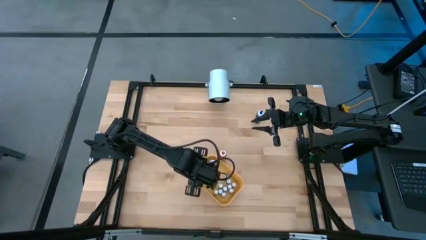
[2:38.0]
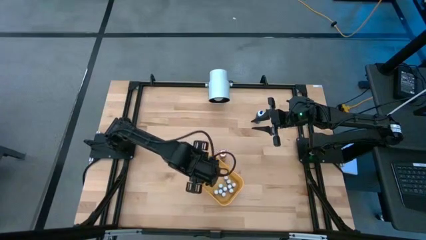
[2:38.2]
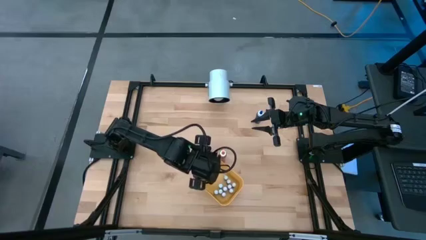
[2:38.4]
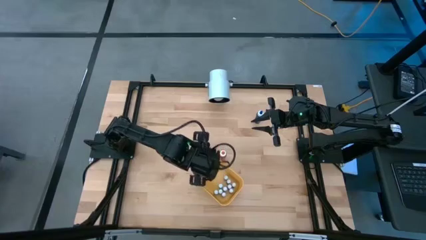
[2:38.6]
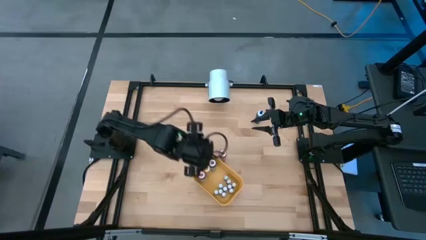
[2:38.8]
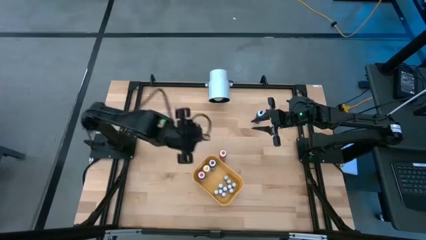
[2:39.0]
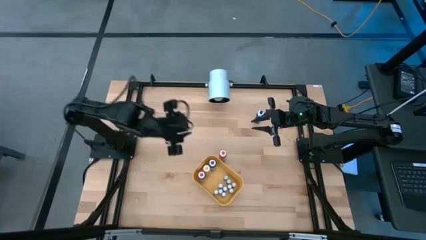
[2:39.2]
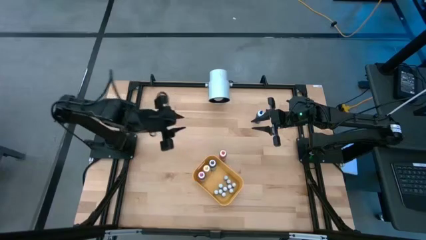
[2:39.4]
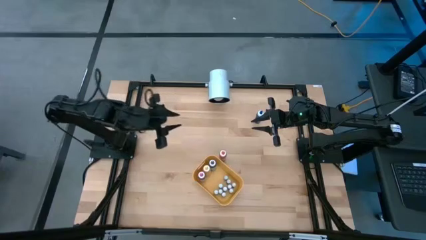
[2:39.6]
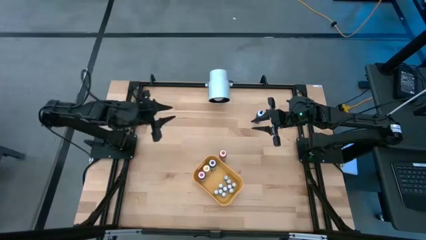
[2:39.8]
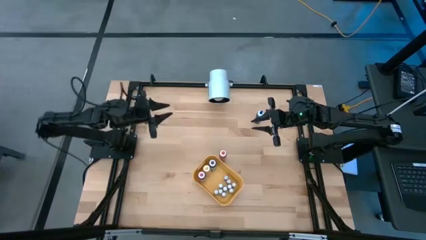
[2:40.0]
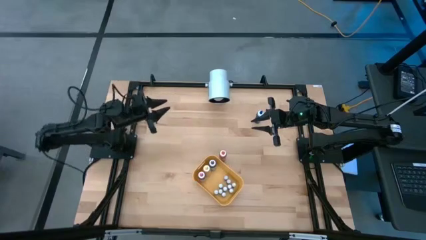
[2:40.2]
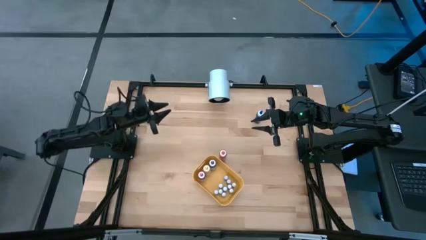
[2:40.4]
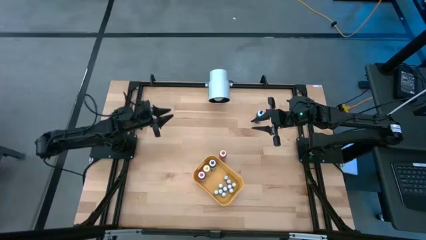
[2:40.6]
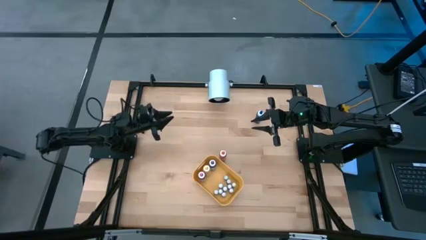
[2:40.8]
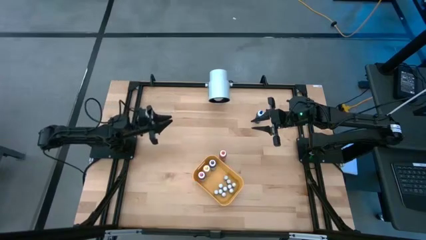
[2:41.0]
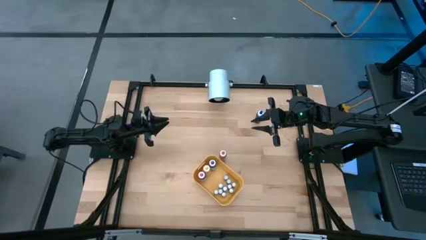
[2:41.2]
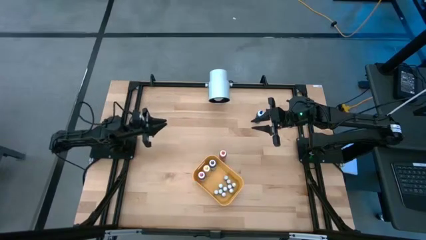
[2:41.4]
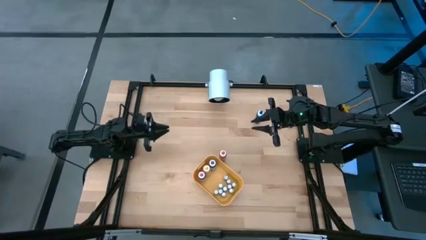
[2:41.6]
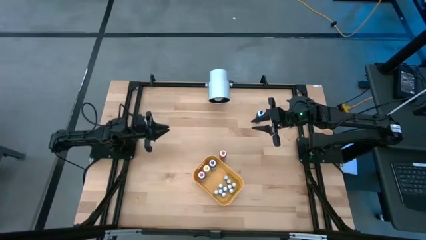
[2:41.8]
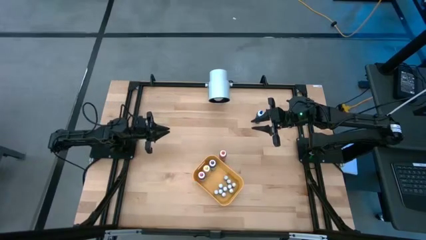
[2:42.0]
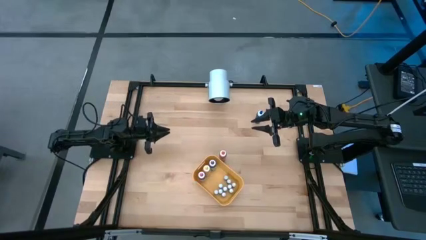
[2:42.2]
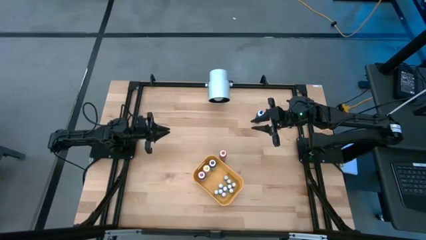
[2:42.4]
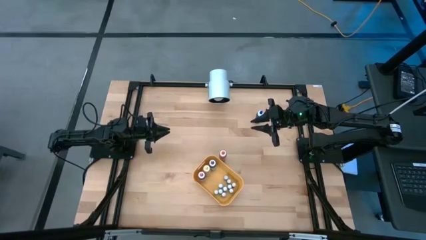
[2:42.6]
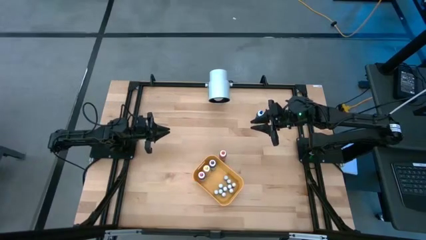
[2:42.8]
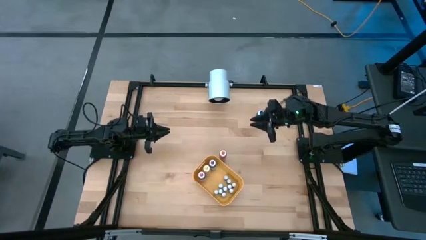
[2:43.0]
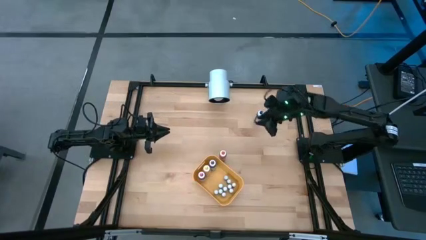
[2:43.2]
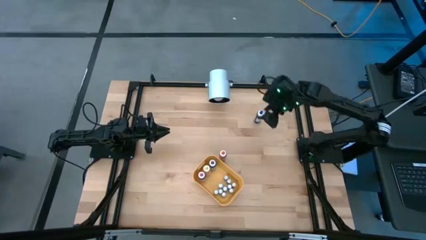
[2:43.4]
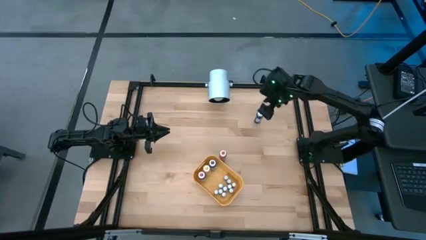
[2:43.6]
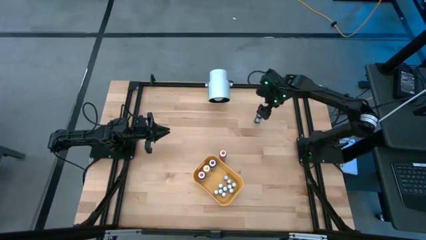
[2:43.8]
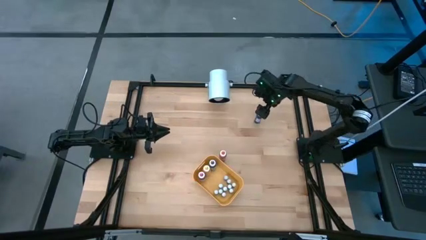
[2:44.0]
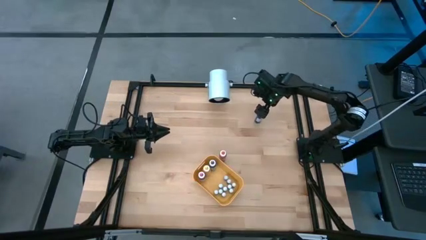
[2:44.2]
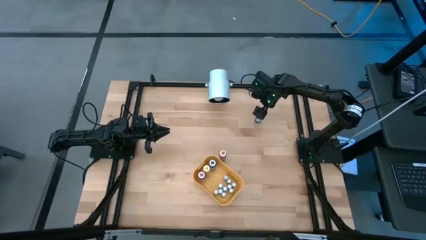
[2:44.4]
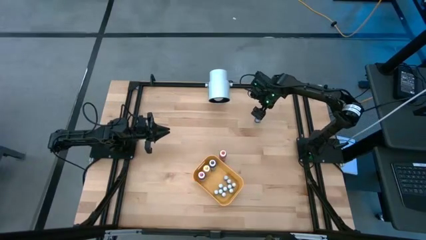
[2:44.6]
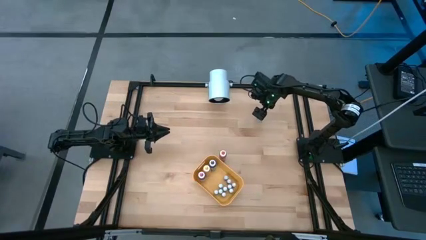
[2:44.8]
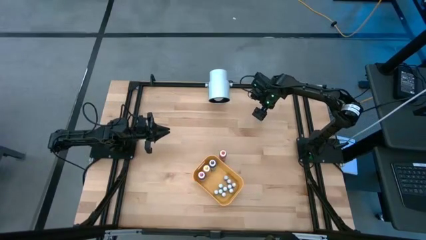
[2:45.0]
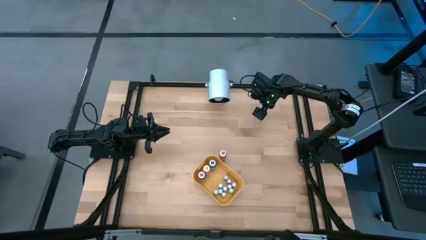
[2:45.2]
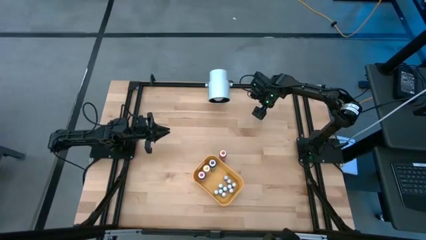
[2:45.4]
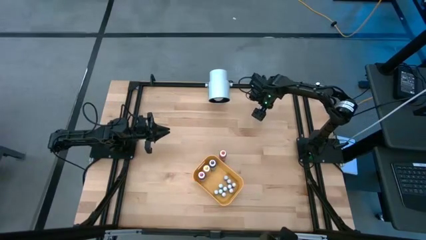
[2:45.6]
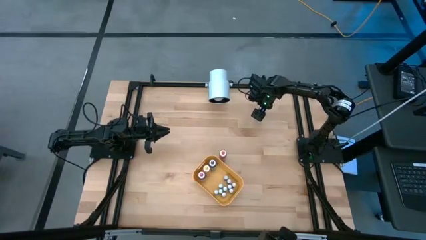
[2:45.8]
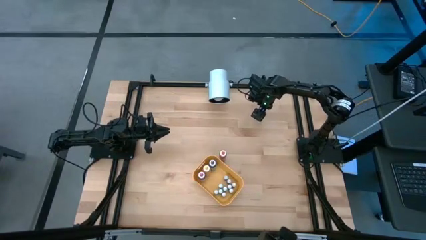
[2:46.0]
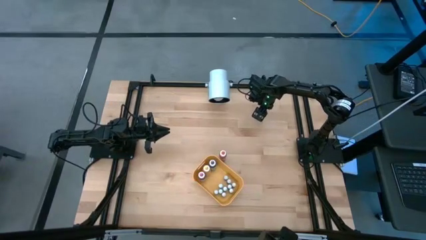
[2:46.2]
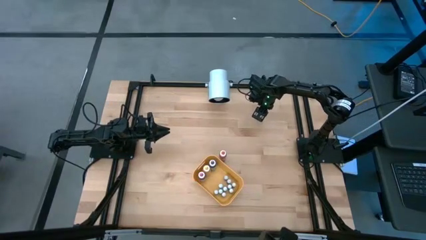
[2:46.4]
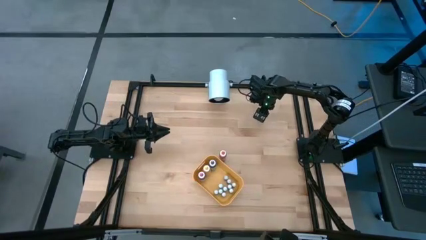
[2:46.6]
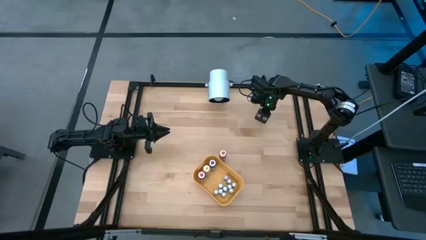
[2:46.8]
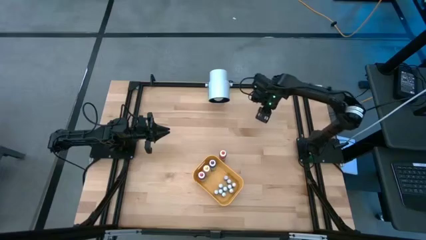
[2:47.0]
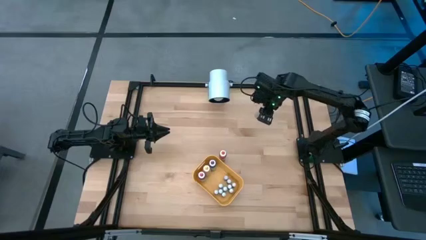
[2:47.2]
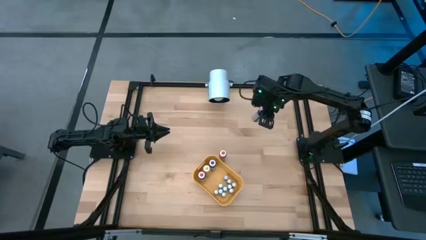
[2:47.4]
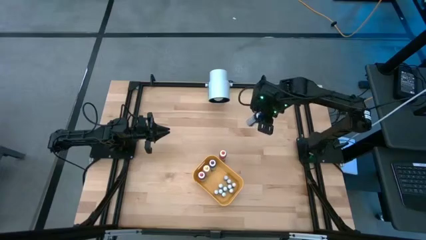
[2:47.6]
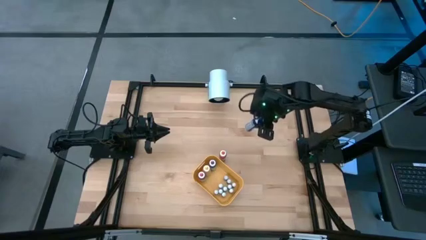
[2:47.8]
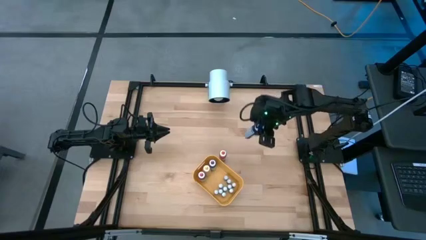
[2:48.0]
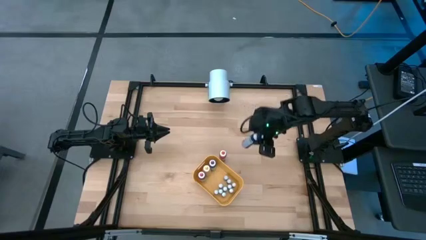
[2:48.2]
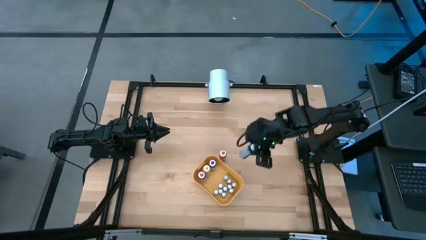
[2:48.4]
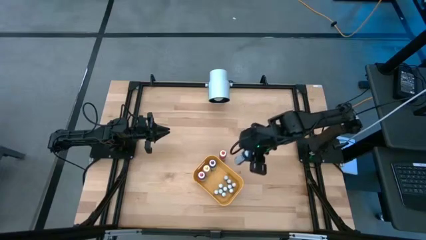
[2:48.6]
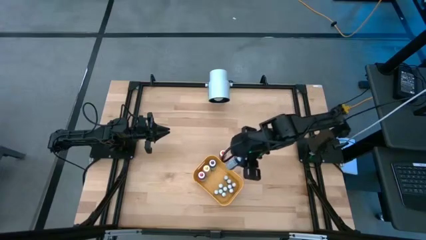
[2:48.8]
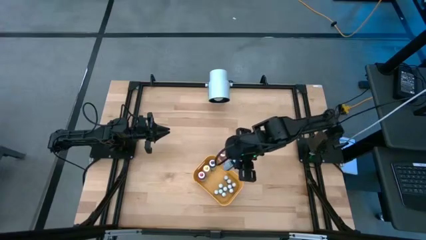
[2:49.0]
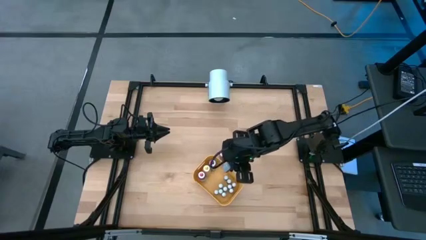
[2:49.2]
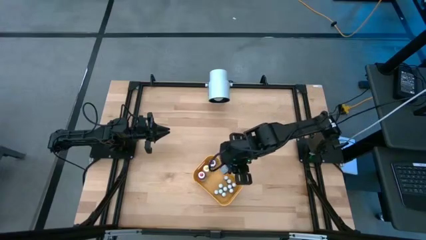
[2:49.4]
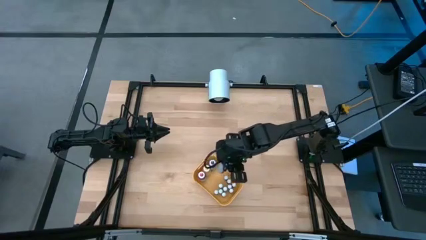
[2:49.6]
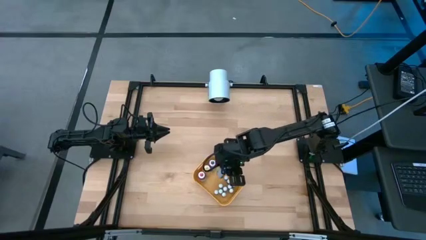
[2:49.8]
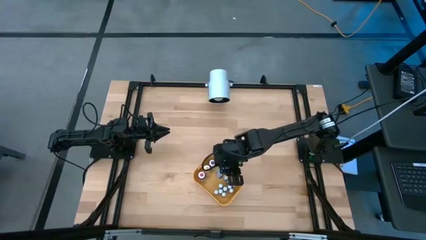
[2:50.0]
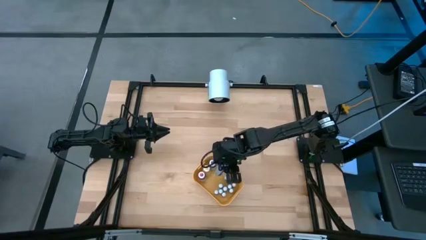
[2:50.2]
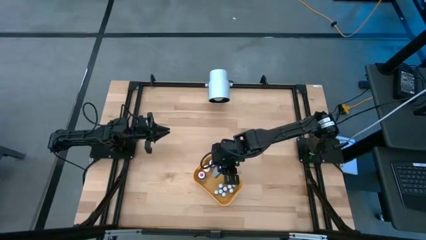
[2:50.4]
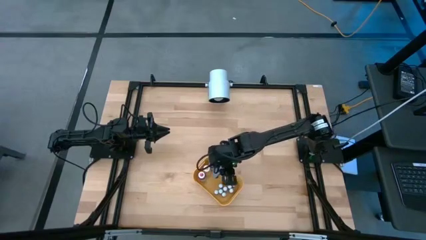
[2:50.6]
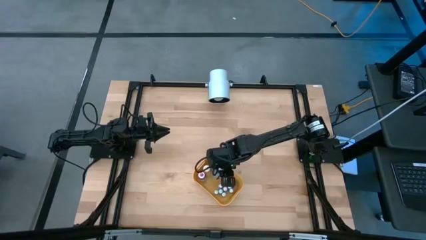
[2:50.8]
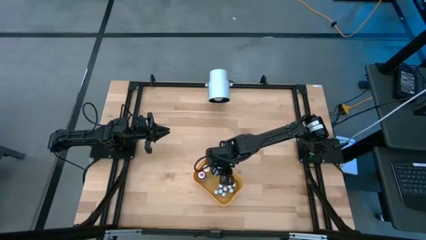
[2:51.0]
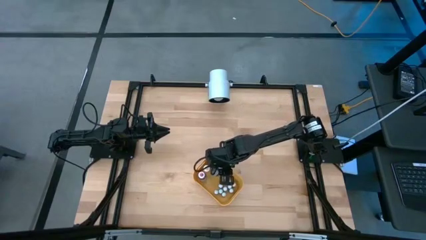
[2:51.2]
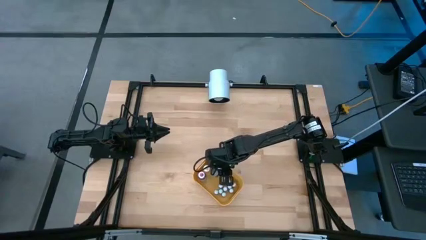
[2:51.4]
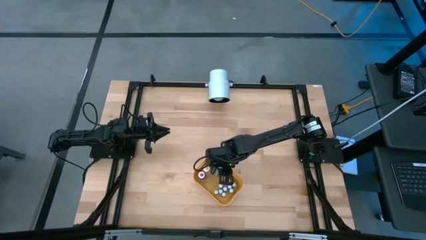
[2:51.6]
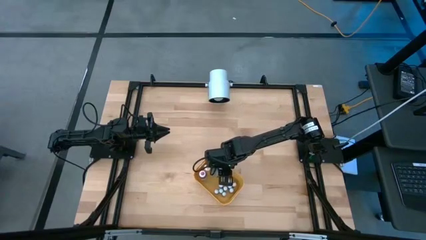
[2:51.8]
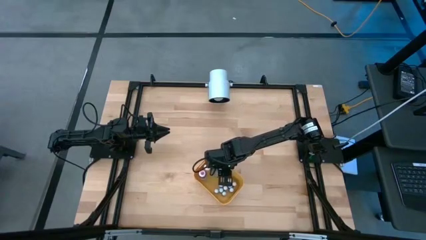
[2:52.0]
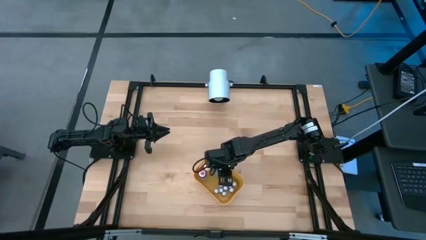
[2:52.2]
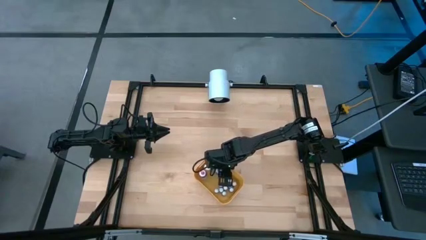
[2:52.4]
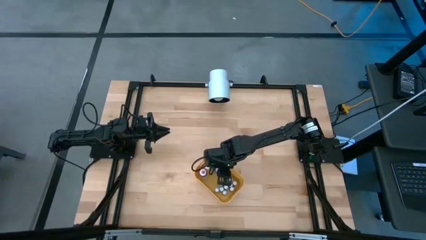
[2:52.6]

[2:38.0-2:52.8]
Task: Pick & Place food coloring
Put the large blue food coloring bottle into the yellow container

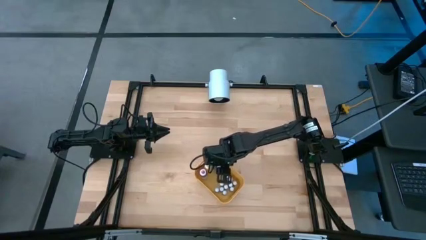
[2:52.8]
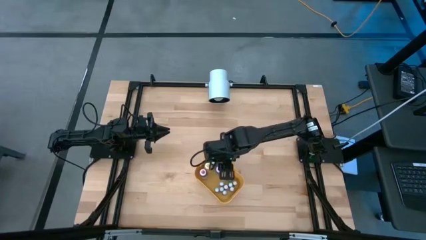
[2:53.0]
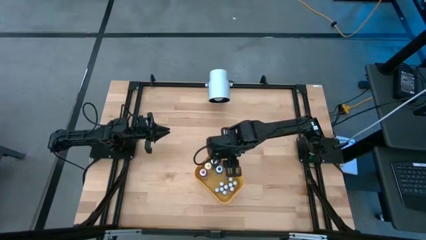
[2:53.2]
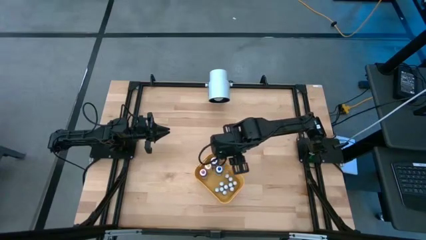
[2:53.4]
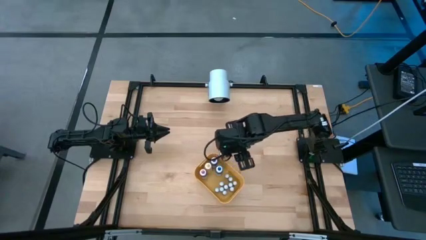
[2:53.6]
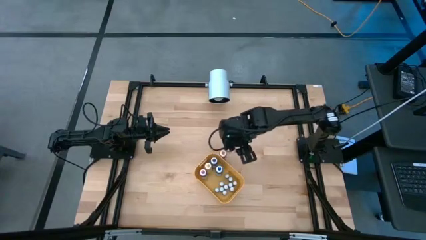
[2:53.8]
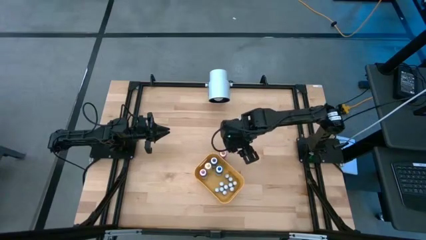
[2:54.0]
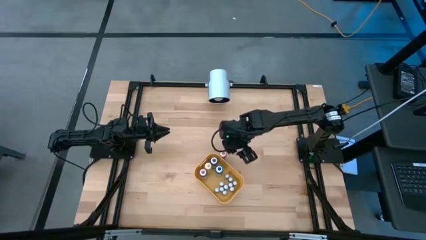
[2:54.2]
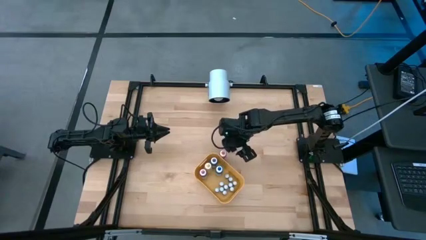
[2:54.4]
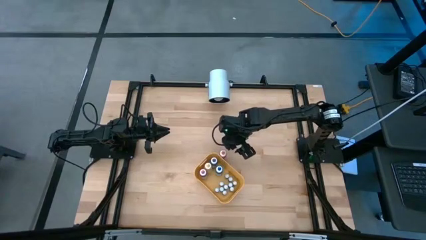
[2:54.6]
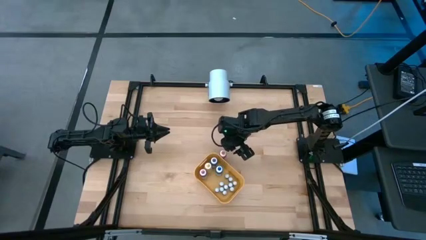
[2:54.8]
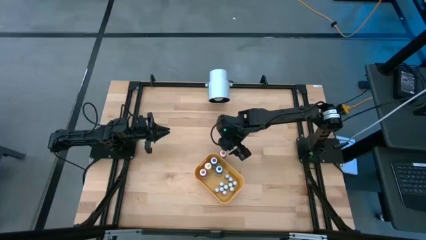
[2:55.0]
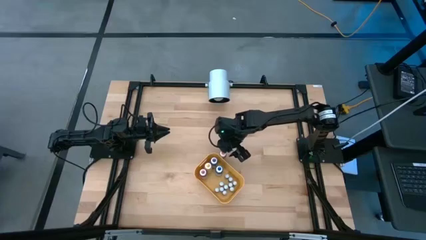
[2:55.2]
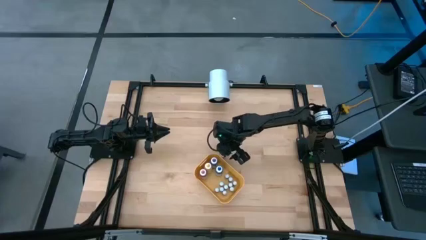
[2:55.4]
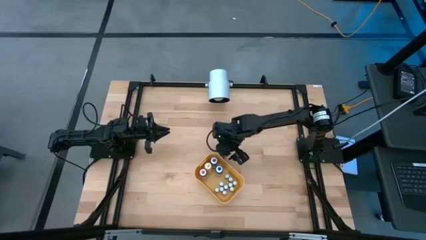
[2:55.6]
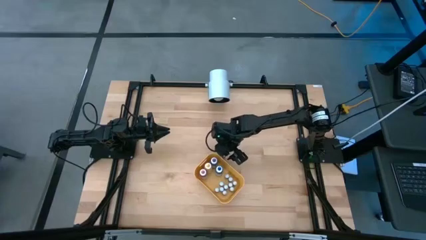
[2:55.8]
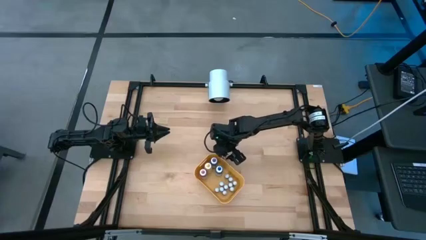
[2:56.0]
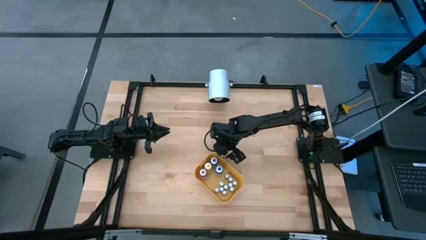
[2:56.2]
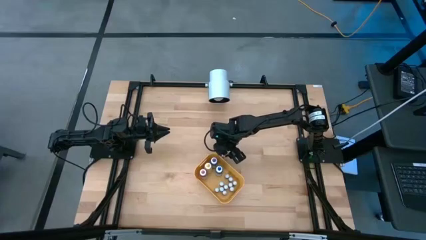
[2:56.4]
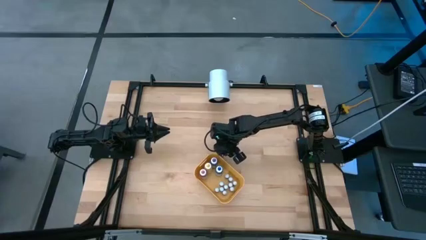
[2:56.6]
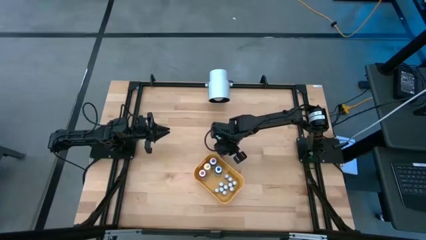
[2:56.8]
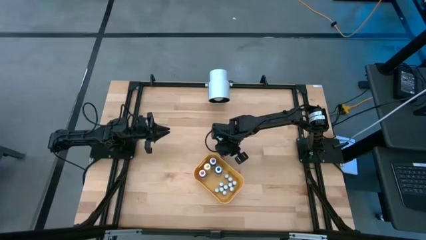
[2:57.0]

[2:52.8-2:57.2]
Put the large orange food coloring bottle into the yellow container
